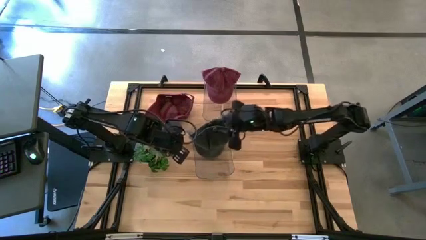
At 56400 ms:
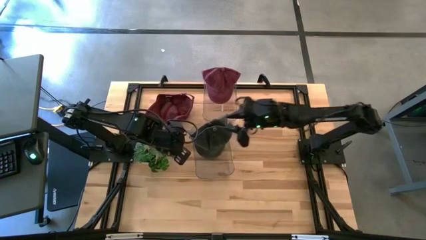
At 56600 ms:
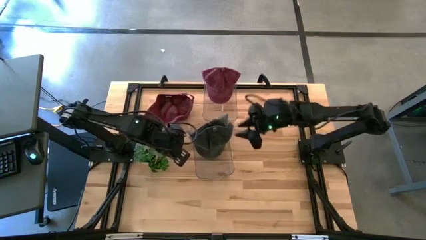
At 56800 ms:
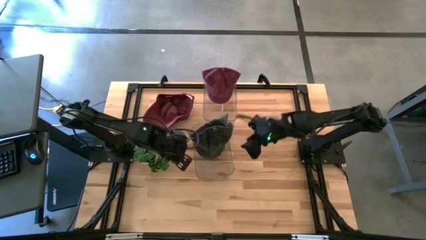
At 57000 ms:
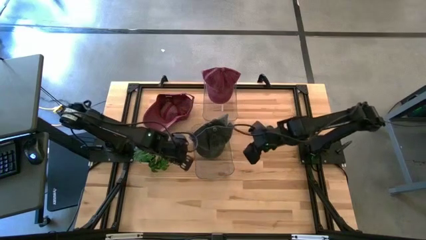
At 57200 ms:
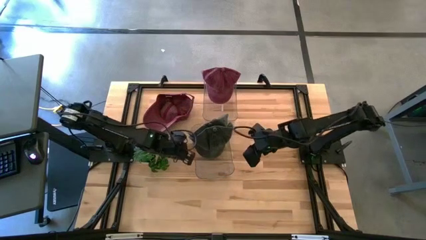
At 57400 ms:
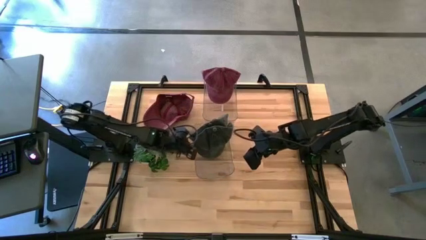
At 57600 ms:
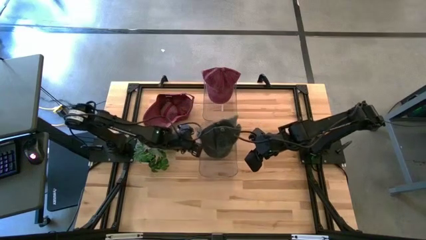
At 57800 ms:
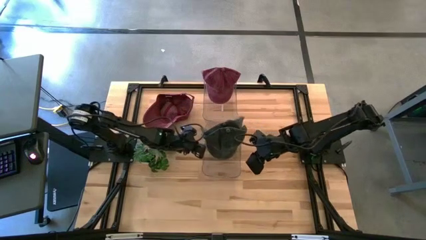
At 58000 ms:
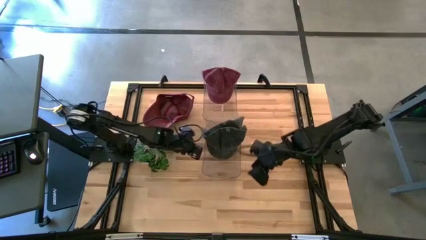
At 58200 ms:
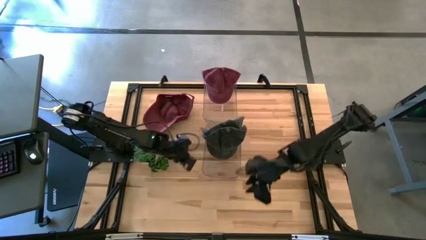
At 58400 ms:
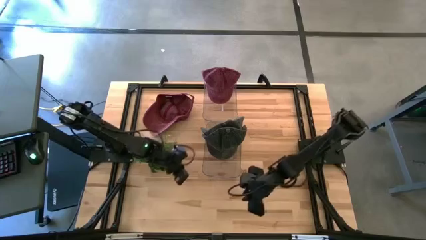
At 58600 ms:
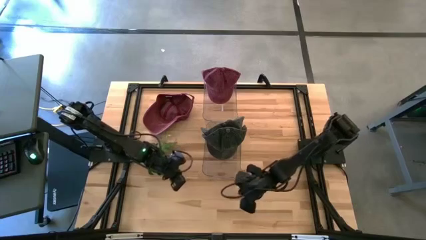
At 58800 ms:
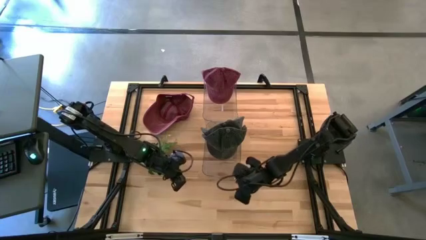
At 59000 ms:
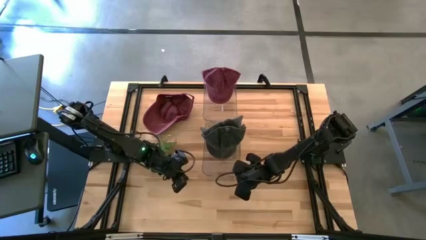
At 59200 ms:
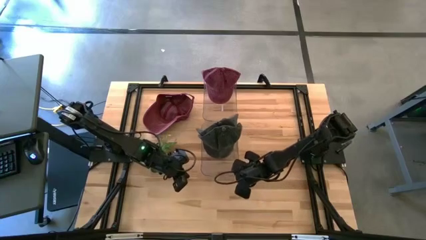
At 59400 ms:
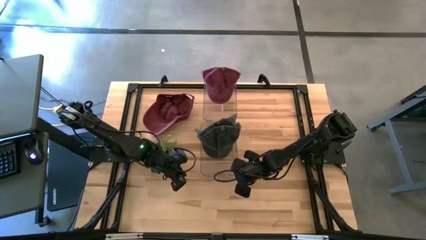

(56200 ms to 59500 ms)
Task: Pick & Place hat
Adjust the bottom transparent bin

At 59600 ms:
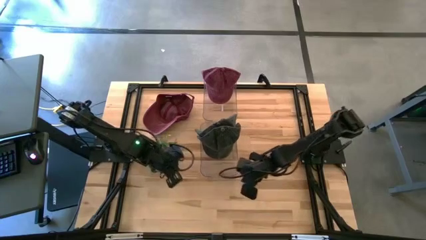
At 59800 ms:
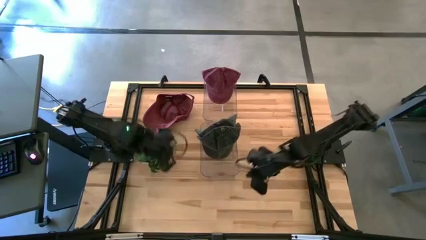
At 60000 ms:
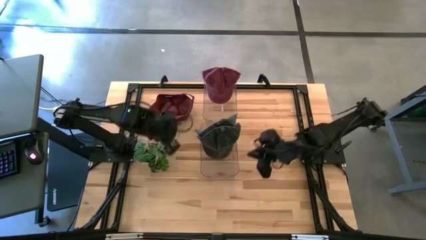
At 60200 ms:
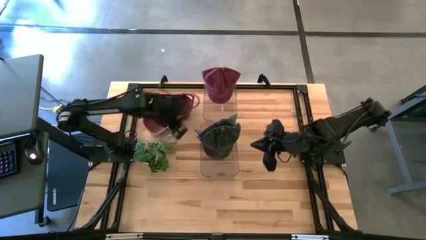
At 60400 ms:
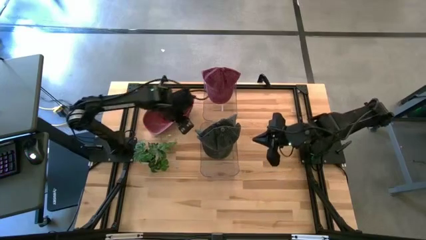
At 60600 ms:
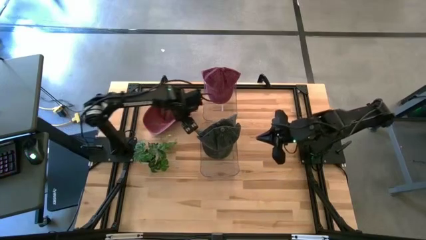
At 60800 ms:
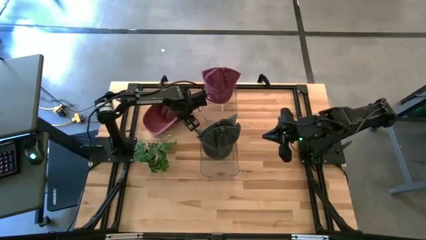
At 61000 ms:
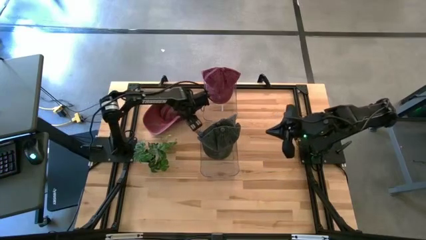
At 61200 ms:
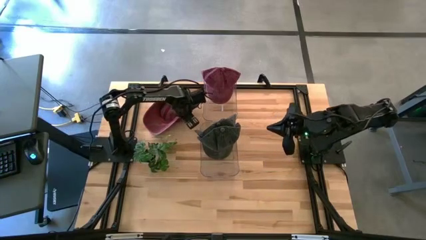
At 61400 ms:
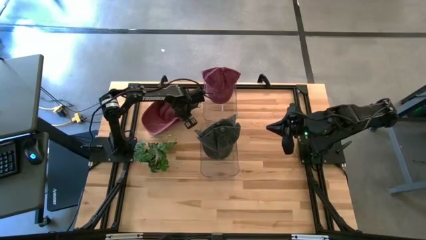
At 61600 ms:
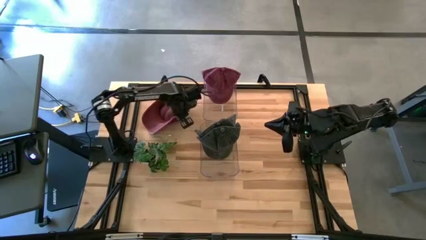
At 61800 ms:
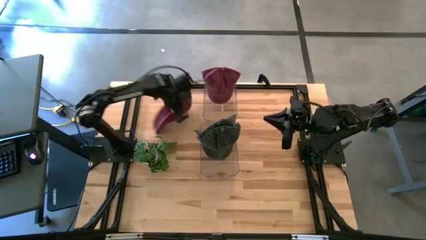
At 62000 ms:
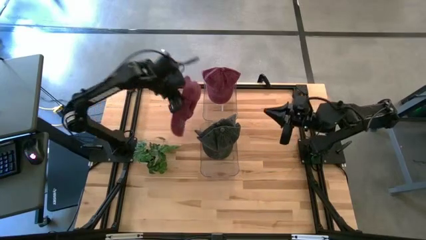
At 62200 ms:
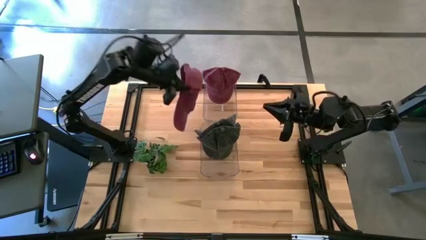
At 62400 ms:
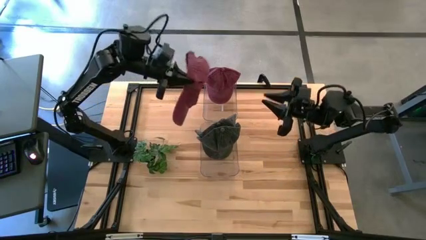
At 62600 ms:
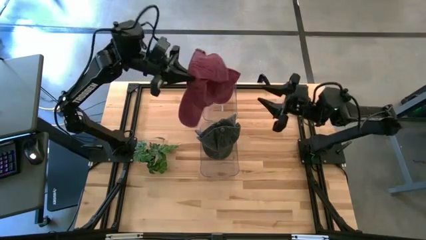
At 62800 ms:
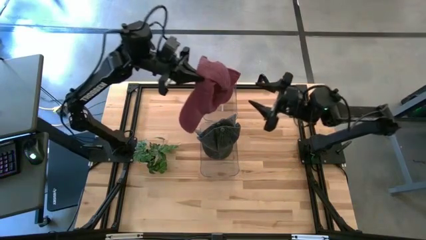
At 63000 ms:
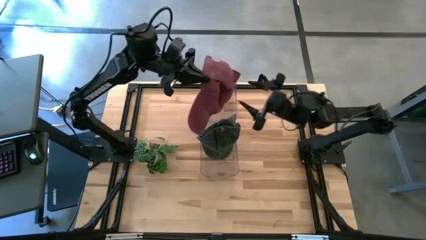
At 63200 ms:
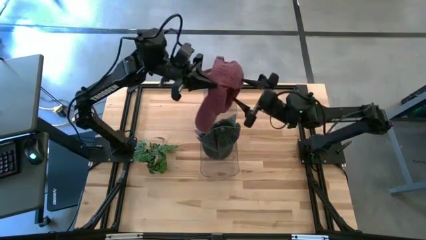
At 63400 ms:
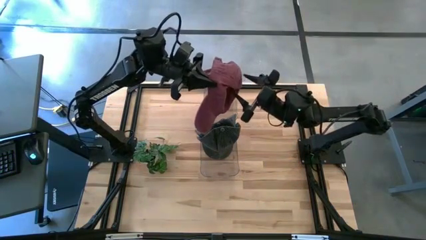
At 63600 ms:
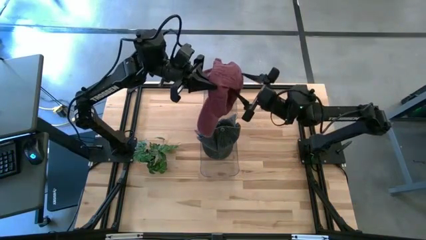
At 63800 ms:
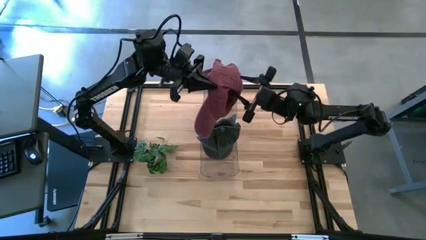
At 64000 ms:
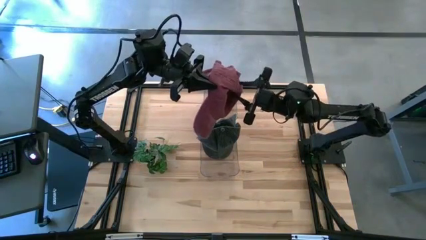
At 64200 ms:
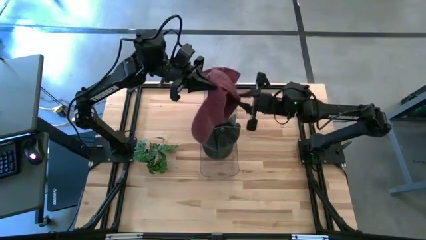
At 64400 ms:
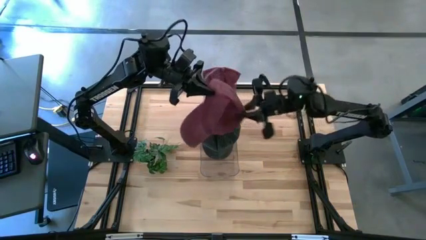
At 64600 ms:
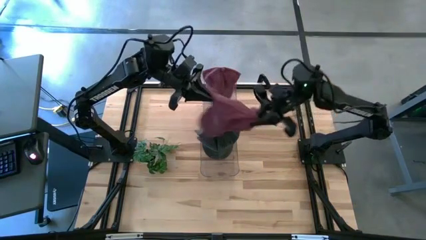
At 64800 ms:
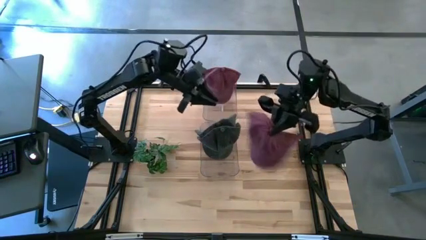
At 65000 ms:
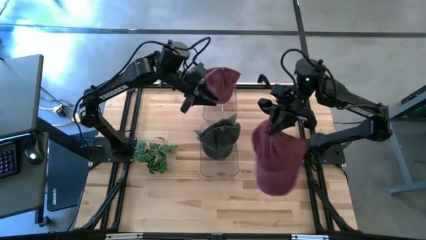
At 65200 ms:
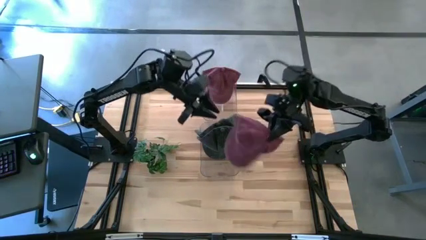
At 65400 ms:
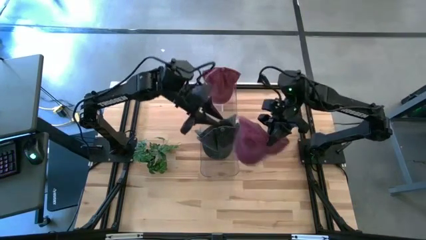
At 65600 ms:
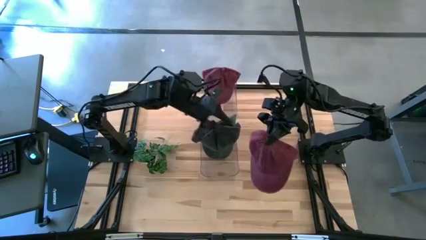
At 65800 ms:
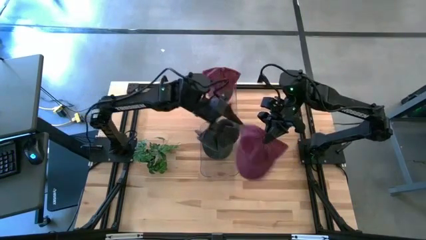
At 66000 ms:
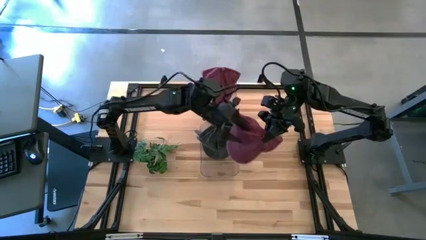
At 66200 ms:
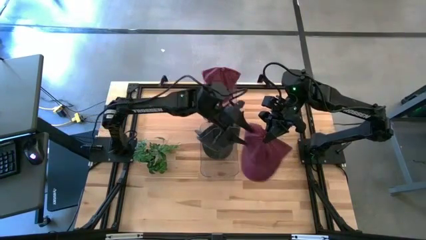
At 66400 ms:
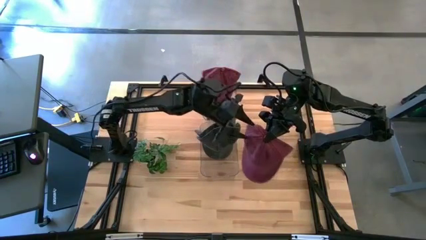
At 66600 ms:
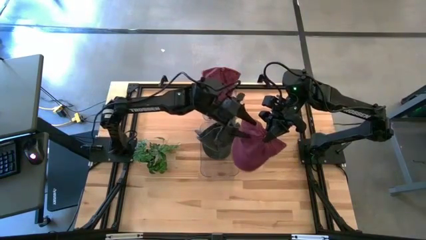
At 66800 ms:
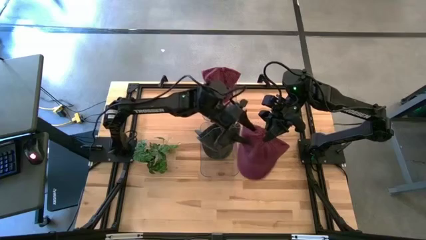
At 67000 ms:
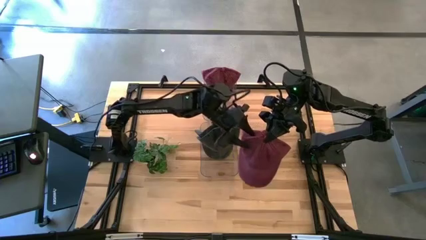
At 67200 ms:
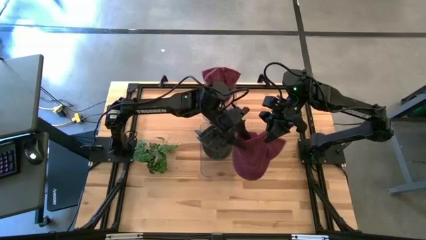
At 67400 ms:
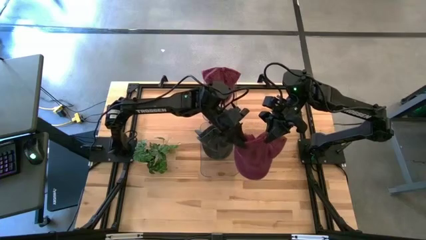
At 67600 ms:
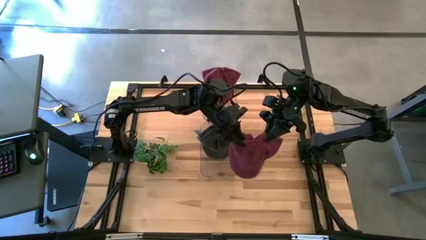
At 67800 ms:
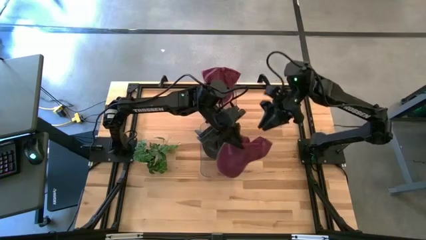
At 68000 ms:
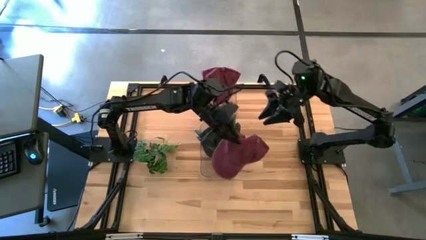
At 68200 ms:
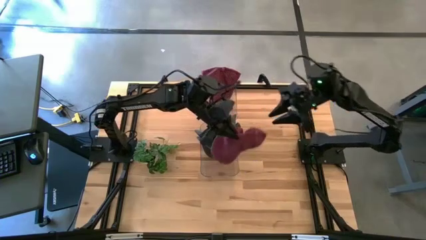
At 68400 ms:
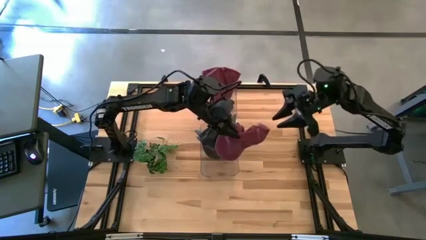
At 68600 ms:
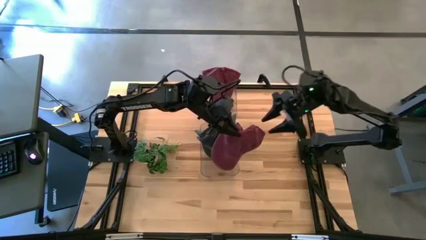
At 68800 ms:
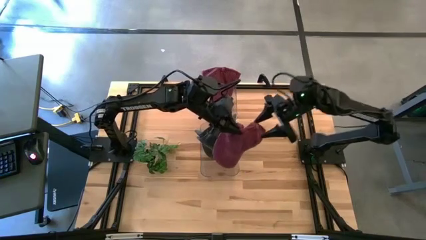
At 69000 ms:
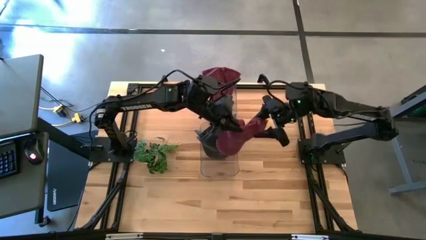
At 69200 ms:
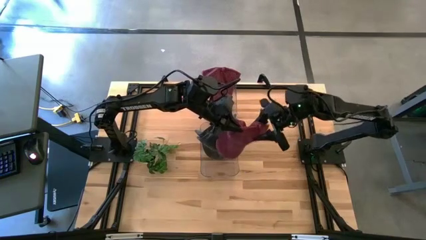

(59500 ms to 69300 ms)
Put the red cap into the top transparent bin

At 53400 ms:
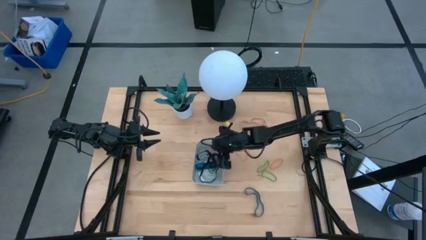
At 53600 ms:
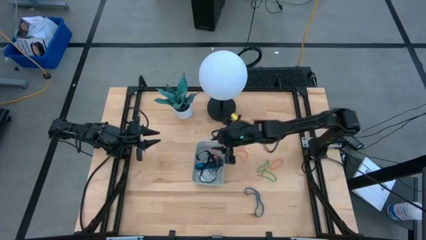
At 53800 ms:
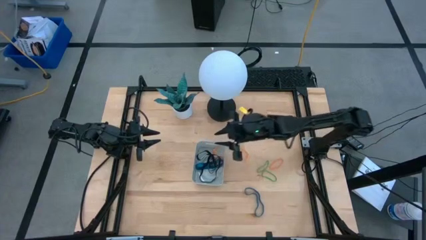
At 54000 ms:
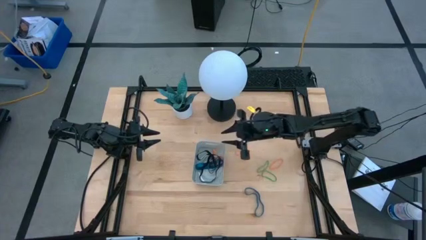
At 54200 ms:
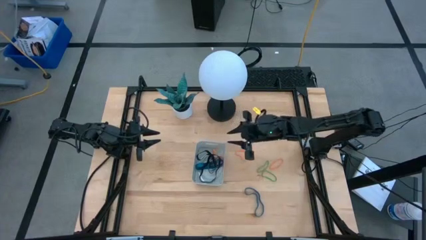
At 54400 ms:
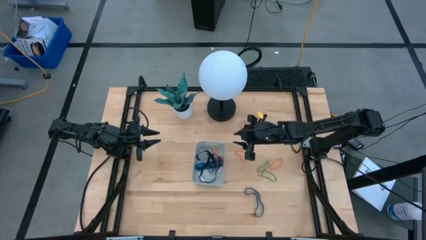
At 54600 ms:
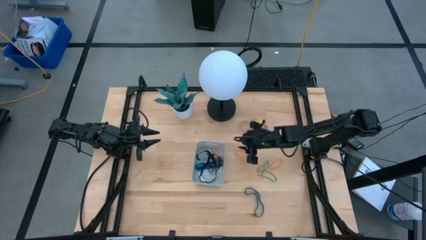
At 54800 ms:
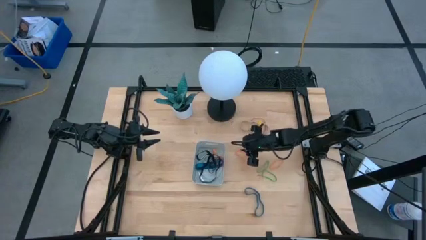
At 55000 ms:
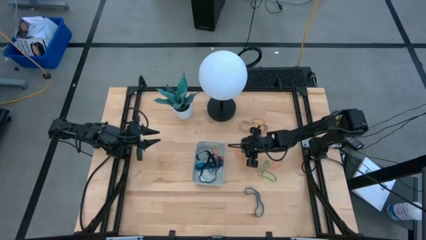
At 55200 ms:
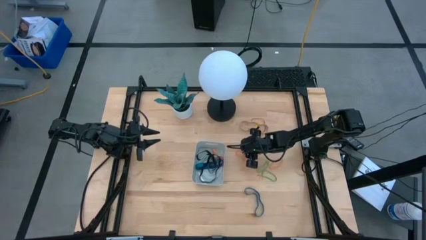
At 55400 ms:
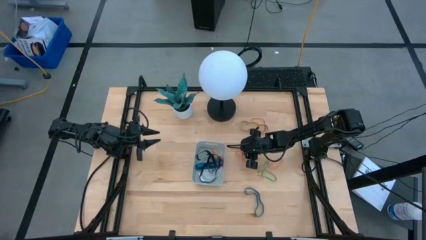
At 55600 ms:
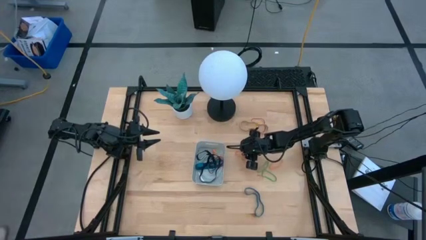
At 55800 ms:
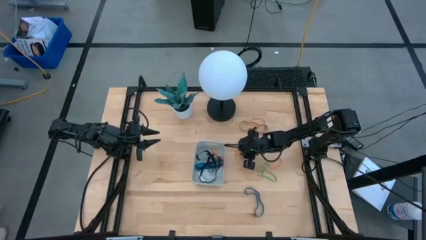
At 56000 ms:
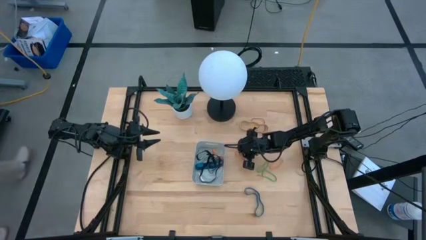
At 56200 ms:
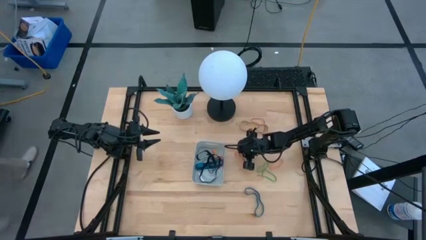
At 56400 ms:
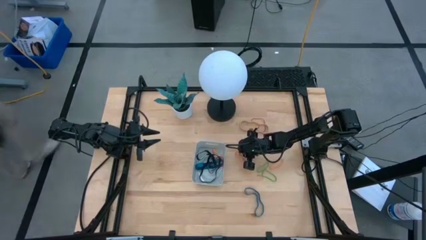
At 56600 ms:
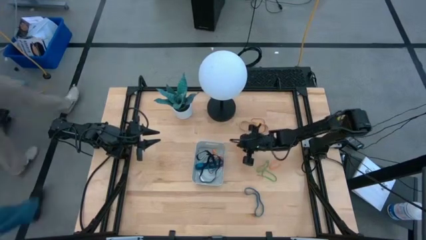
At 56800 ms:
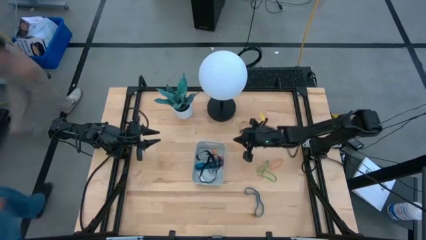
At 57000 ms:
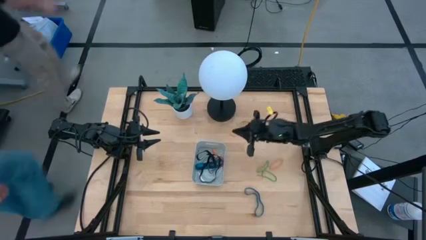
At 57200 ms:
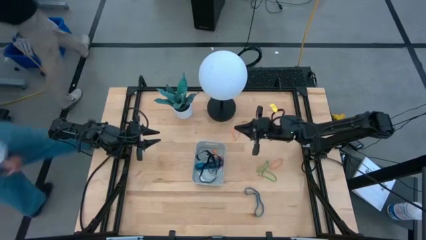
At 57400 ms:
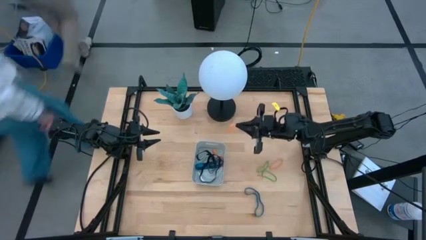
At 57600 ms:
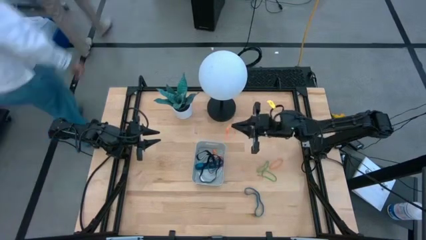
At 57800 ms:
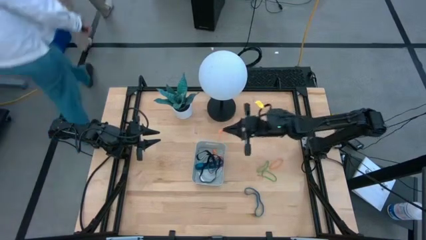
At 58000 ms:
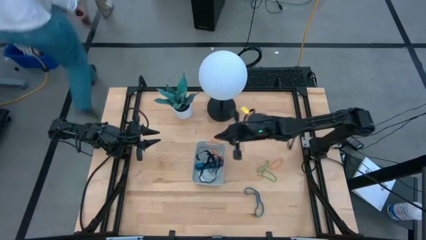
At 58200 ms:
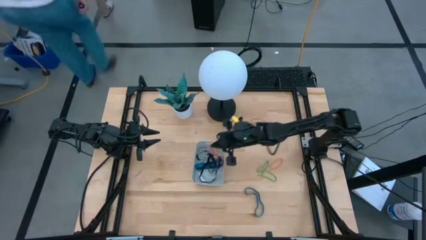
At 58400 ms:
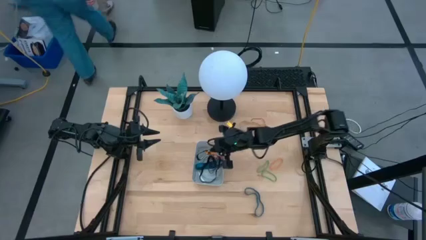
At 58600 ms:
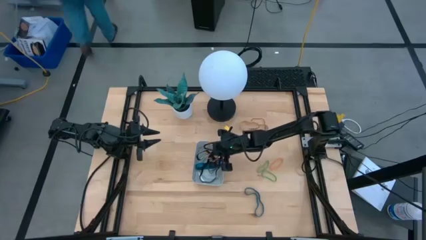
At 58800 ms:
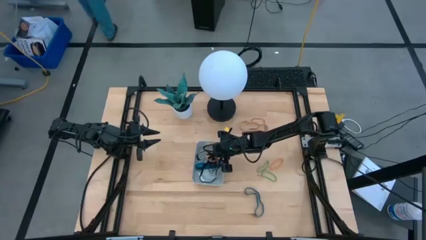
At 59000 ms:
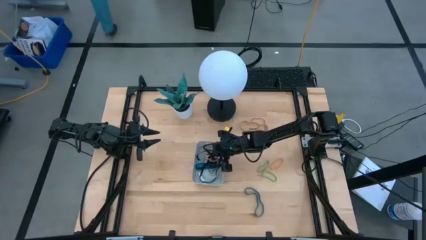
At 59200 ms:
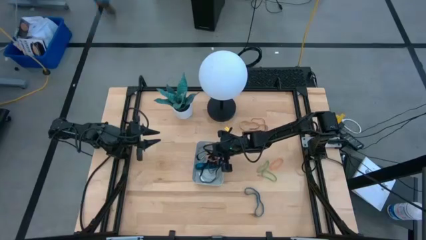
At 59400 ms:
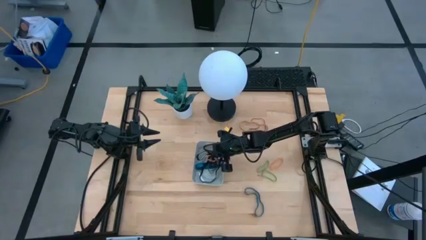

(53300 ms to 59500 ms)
Task: Pick and place rubber bands into bin
Put the top orange rubber band into the gray bin
